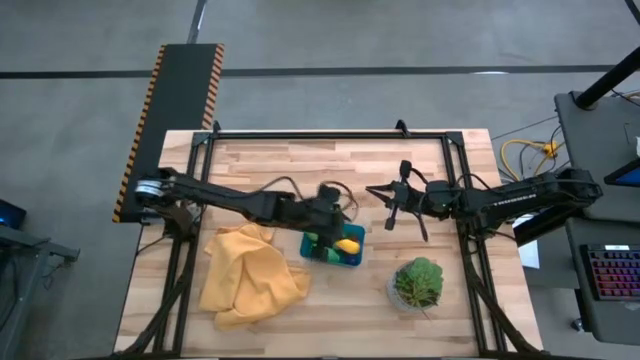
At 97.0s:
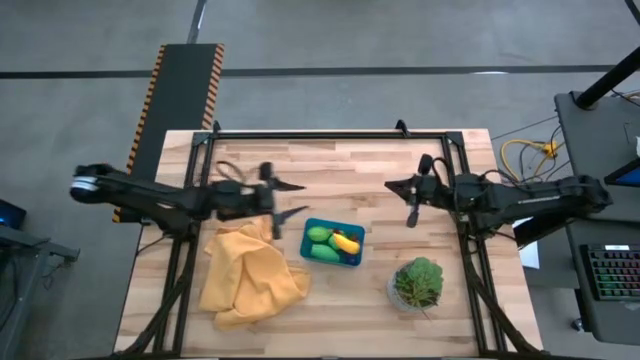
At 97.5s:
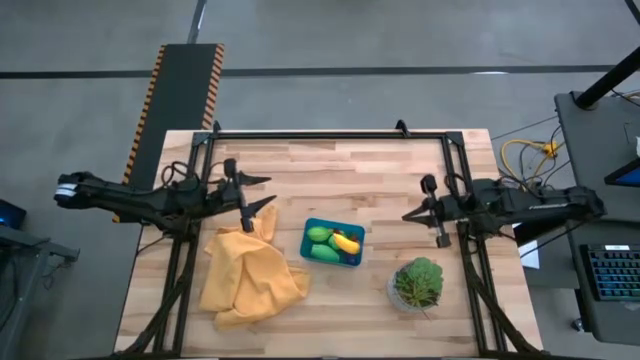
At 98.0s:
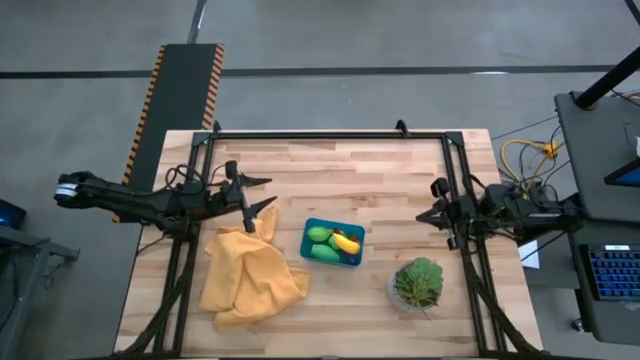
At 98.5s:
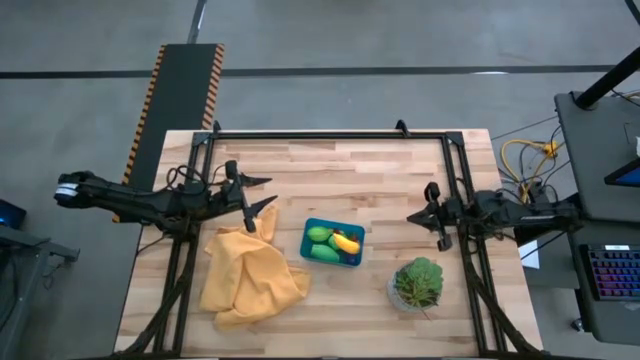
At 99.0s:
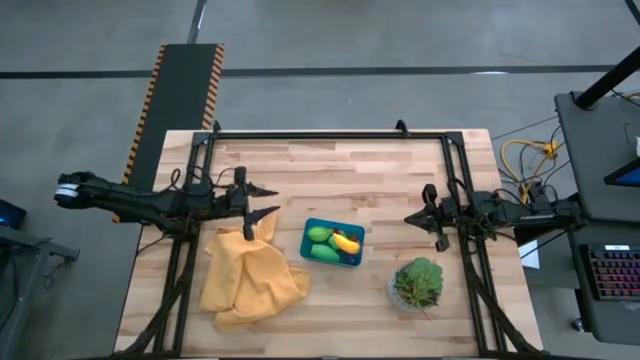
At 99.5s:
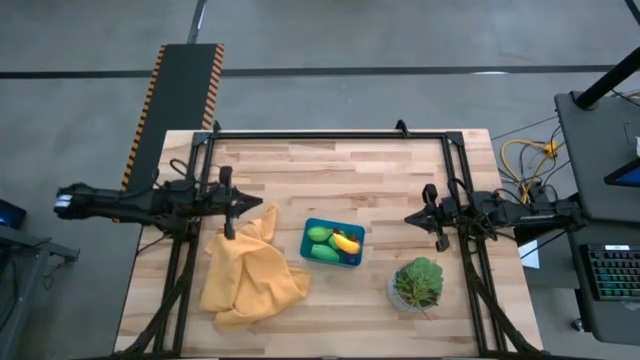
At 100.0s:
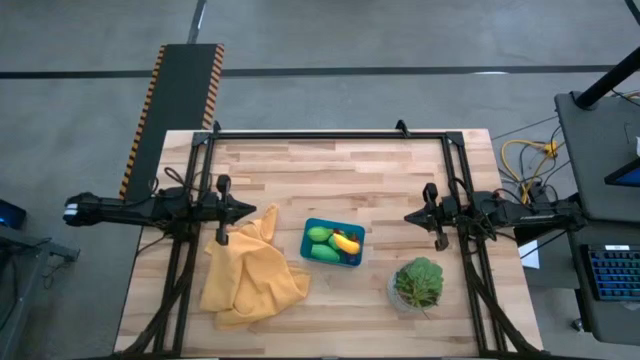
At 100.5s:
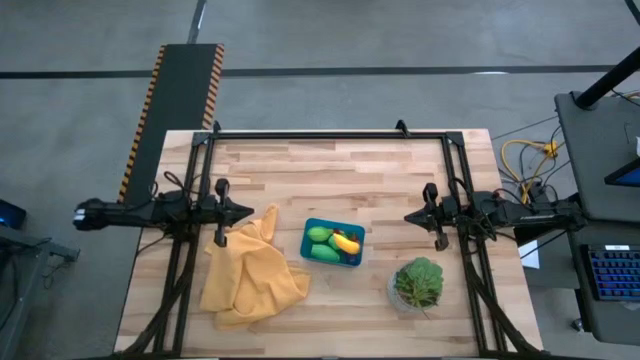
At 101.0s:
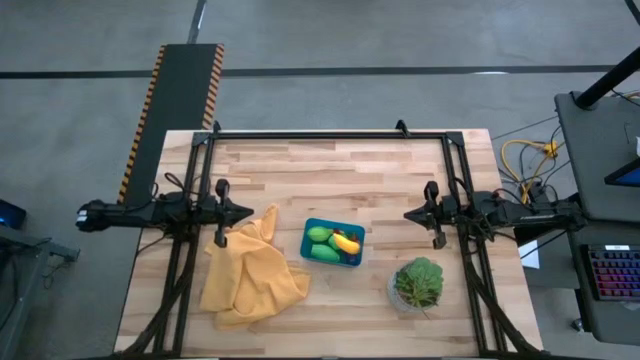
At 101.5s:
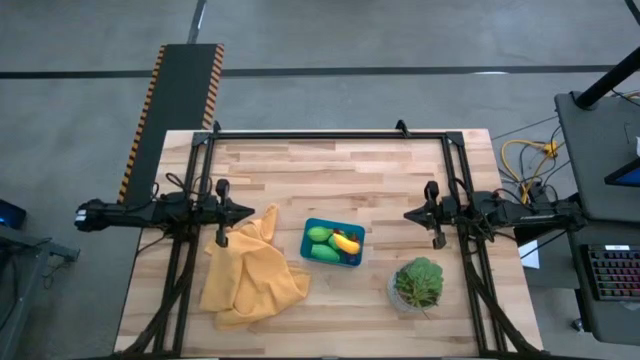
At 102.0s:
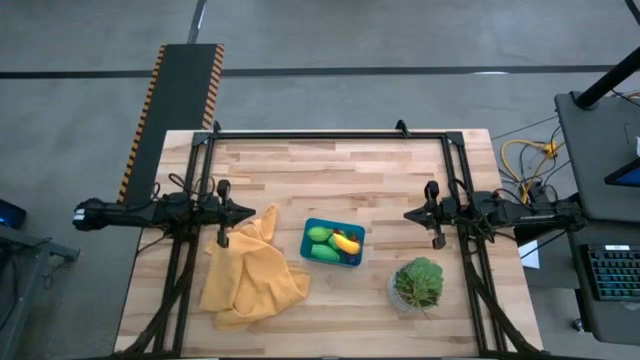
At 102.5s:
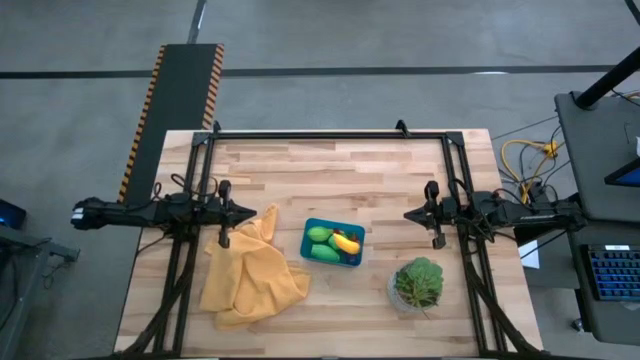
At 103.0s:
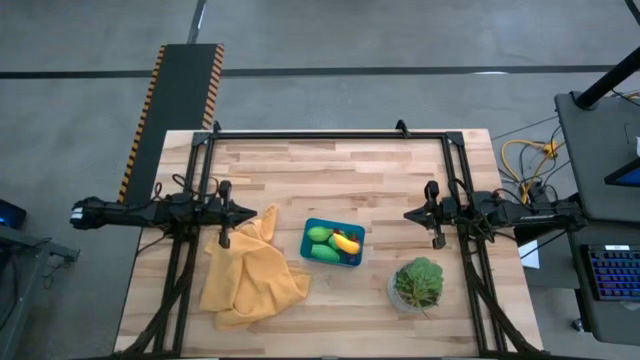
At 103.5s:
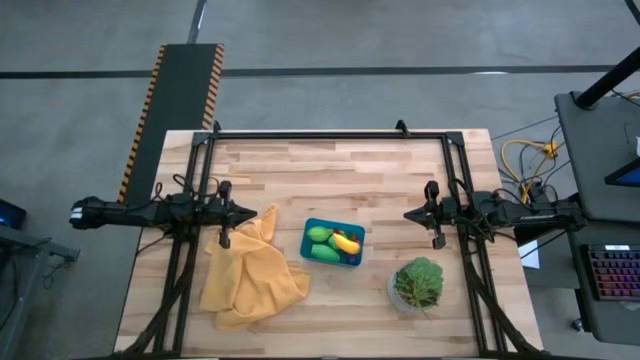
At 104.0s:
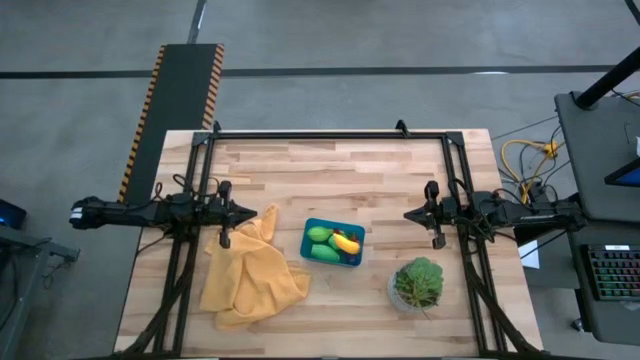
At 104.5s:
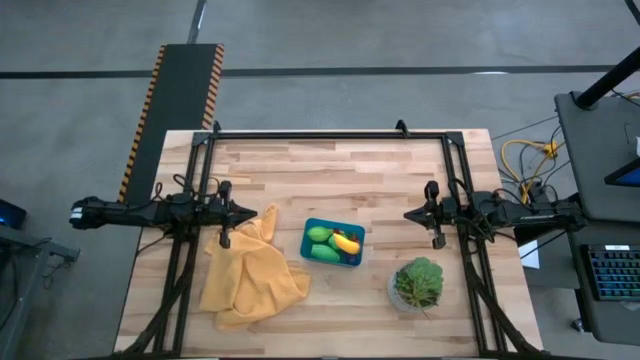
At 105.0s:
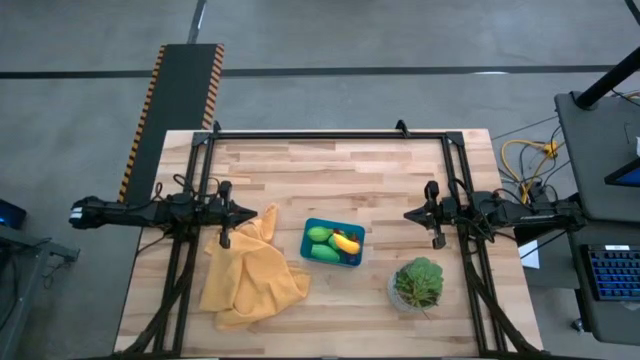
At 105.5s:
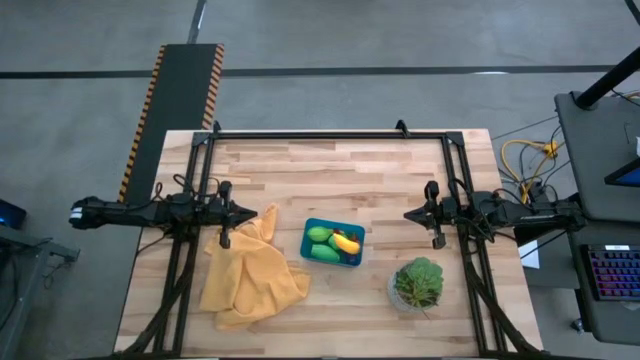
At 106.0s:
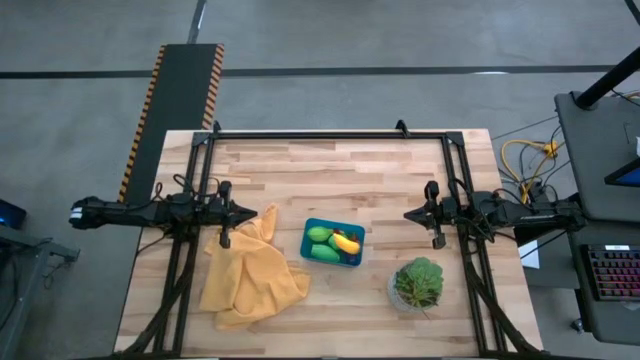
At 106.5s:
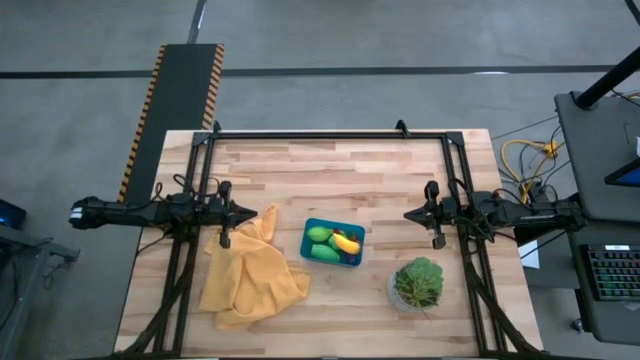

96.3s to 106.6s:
Task: Pick and placing Produce into tupperware
Return to Home Position

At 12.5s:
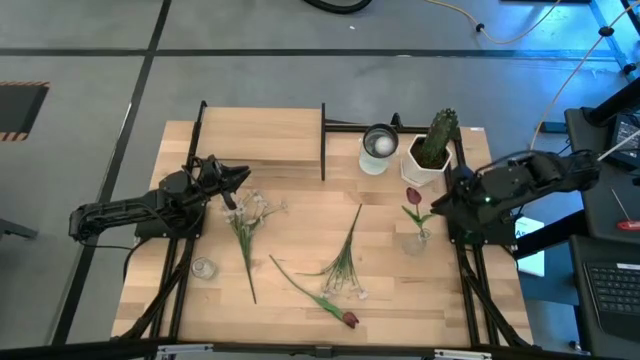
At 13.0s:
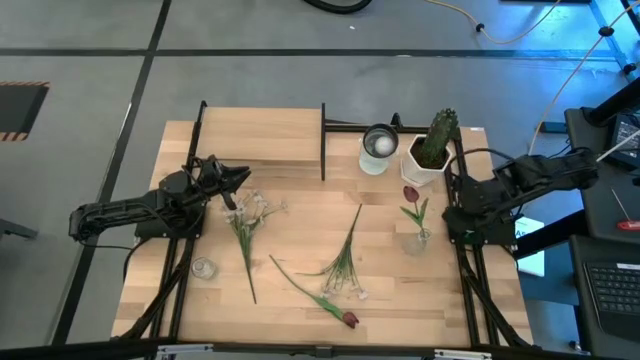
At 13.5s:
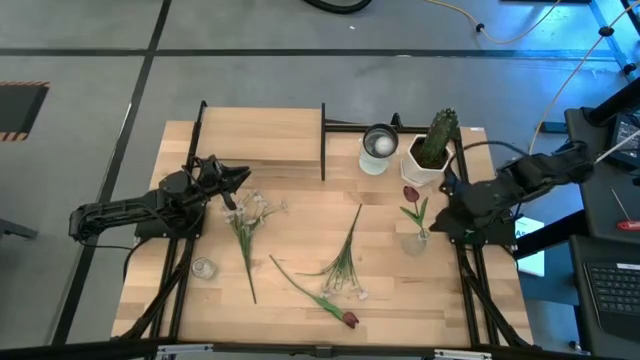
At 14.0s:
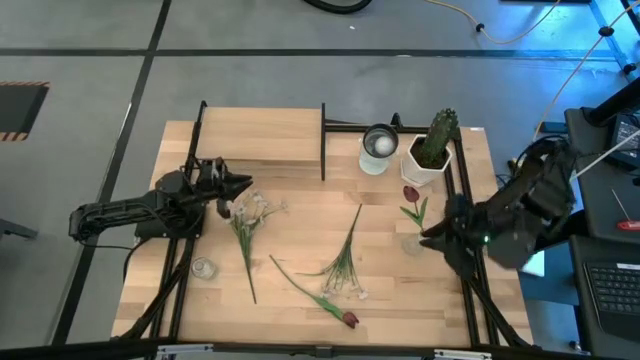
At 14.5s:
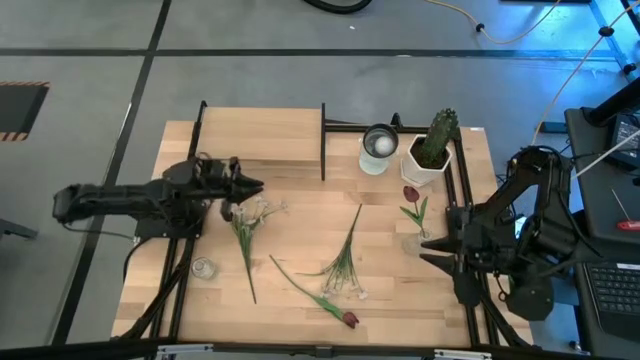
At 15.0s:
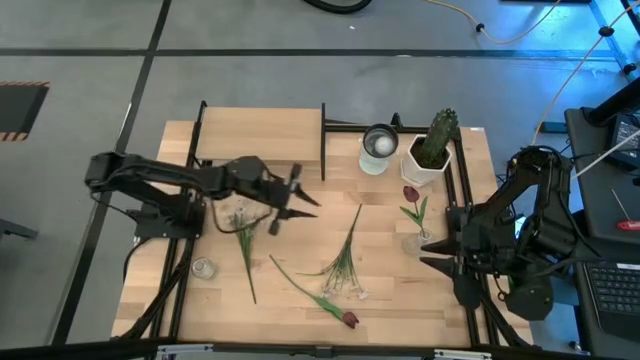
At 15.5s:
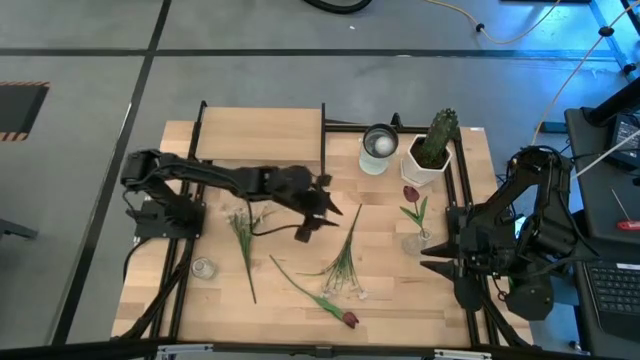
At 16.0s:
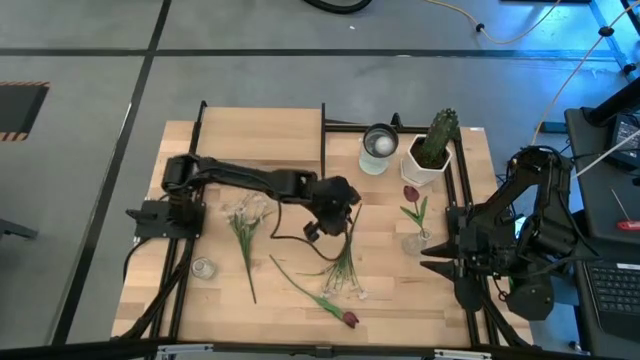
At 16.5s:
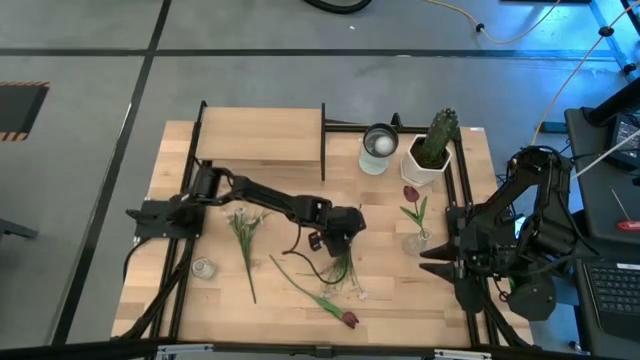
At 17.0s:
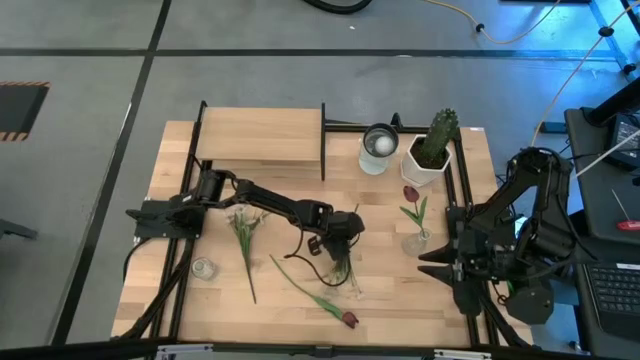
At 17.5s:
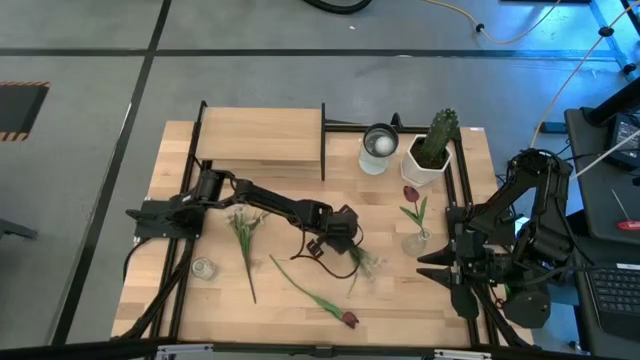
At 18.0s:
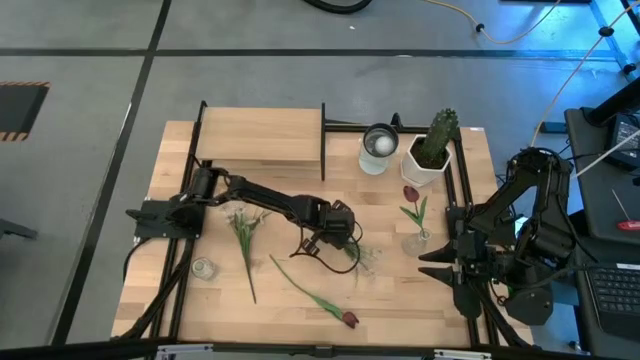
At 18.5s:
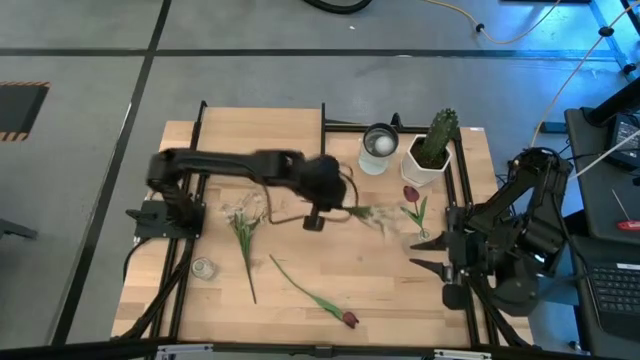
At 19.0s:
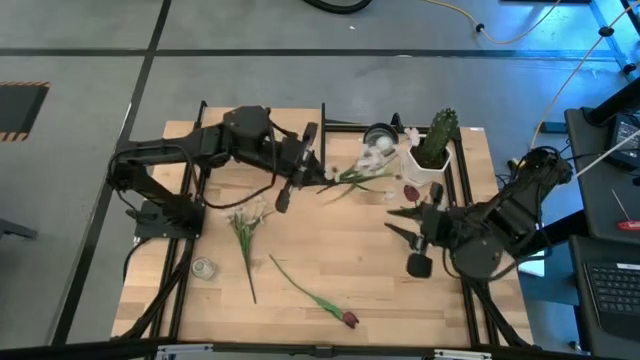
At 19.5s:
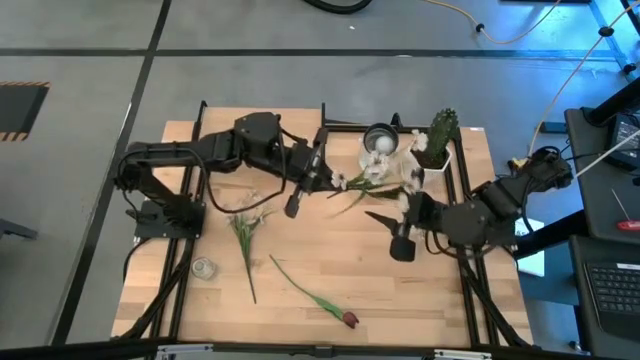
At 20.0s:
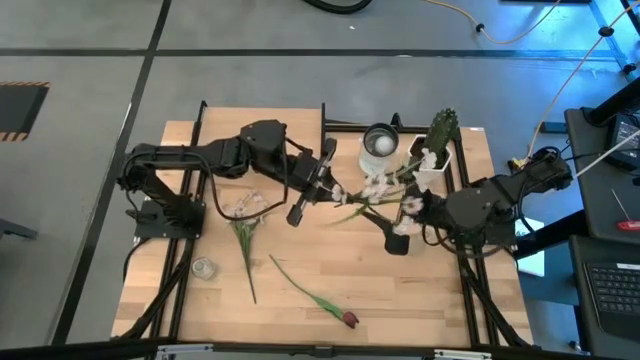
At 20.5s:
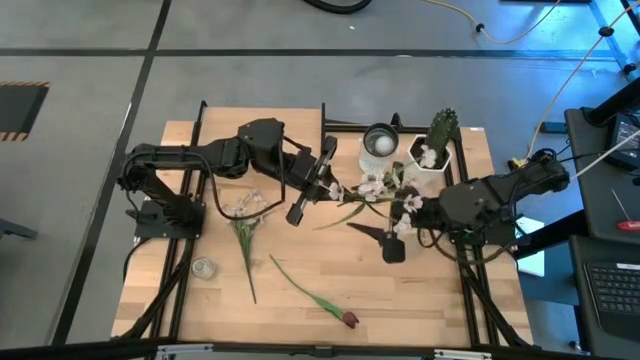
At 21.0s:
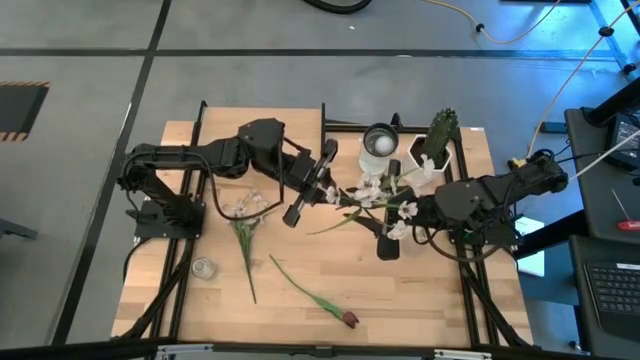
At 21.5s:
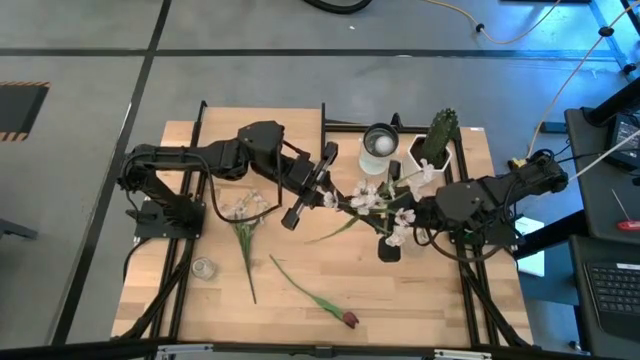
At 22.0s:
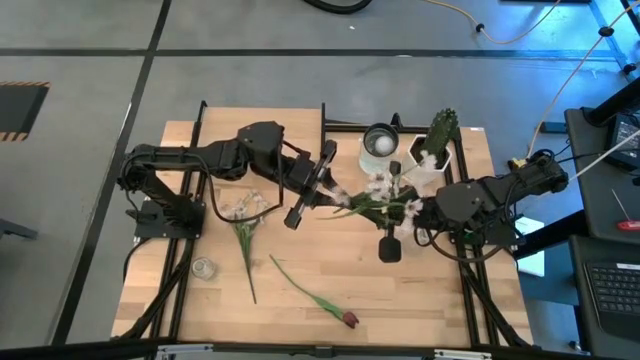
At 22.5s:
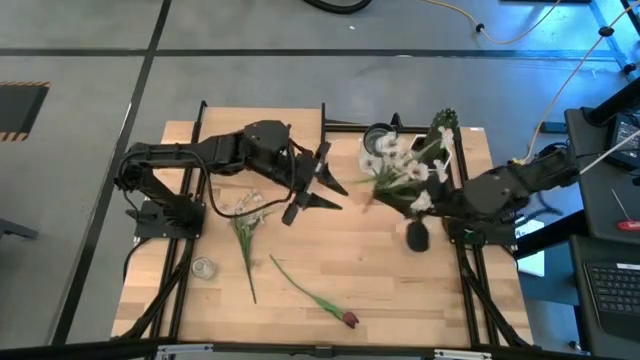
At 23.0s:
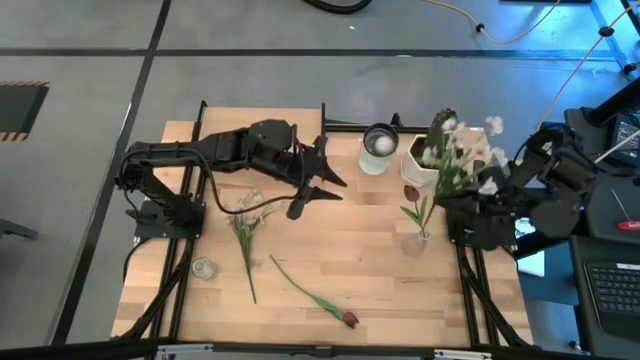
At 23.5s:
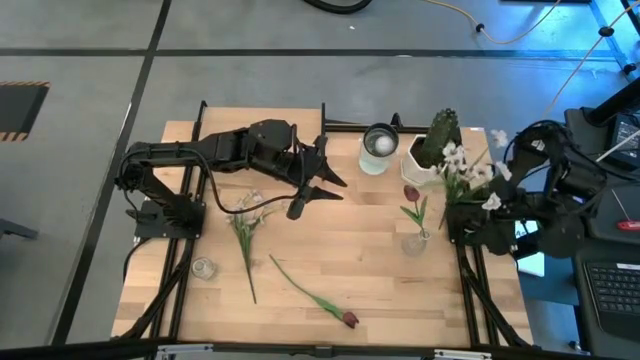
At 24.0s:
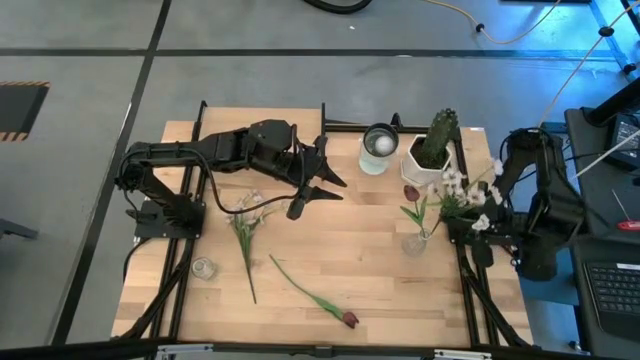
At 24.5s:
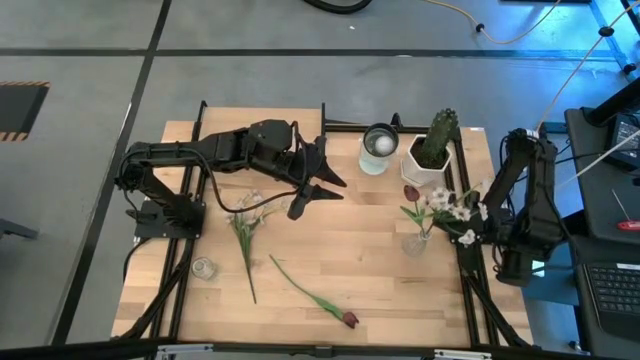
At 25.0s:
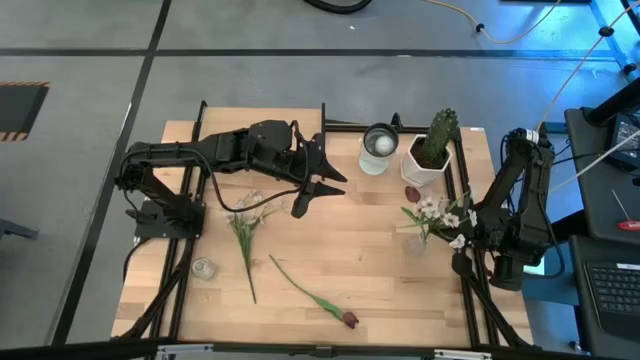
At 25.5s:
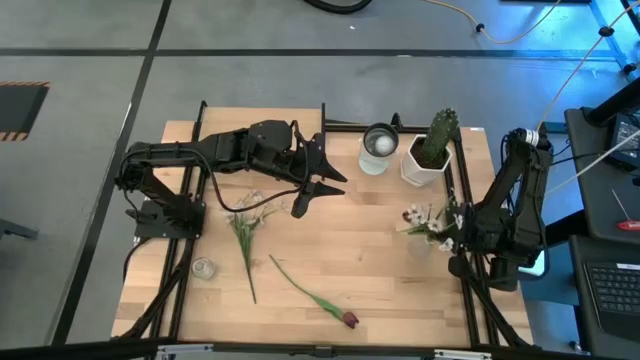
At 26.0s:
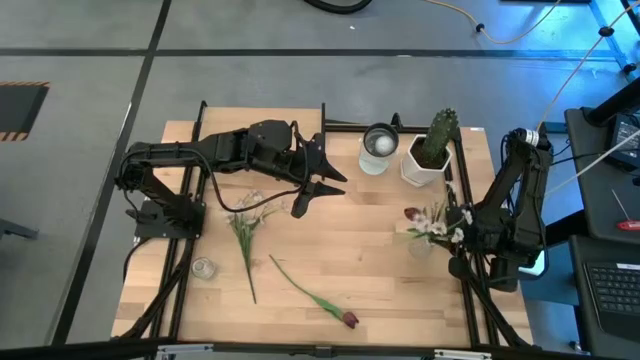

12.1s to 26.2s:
Task: Pick and place flowers into a vace then onto a shelf
Put the right white flowers into the right transparent vase
